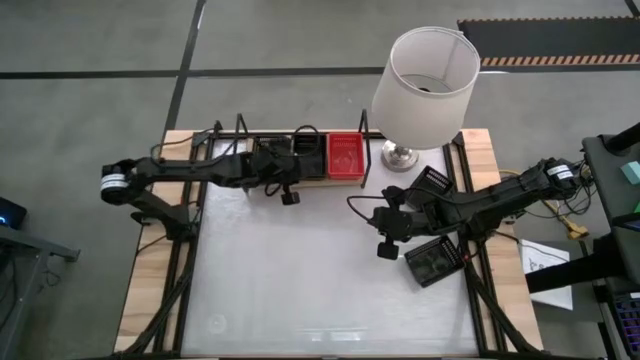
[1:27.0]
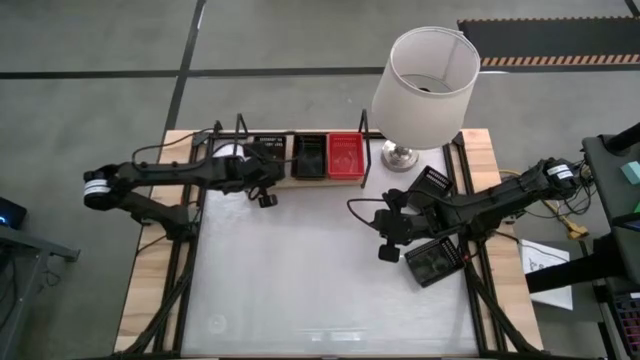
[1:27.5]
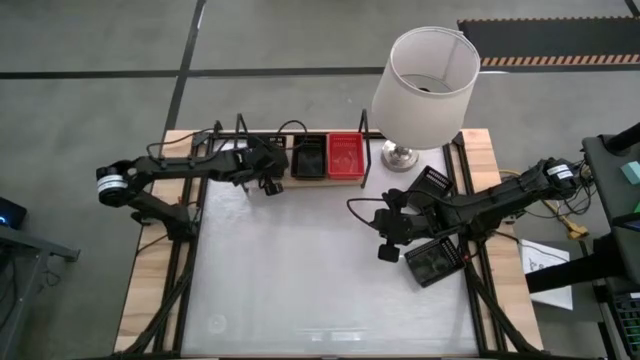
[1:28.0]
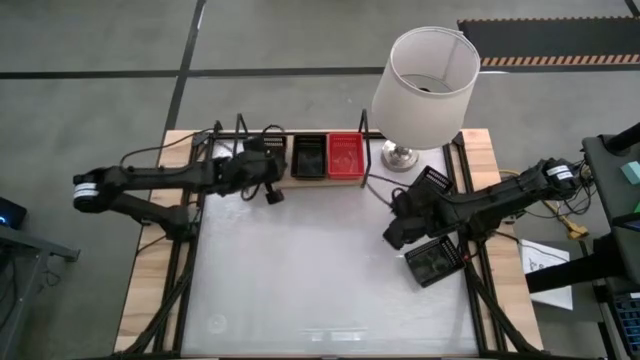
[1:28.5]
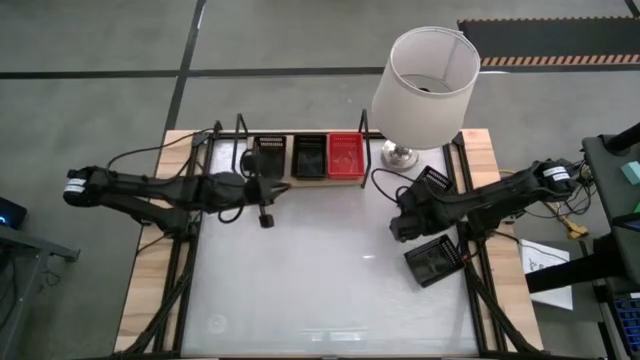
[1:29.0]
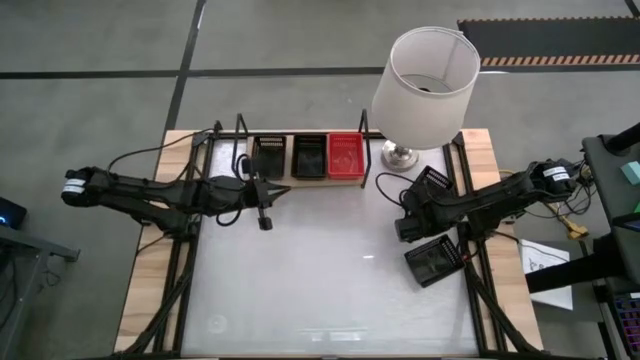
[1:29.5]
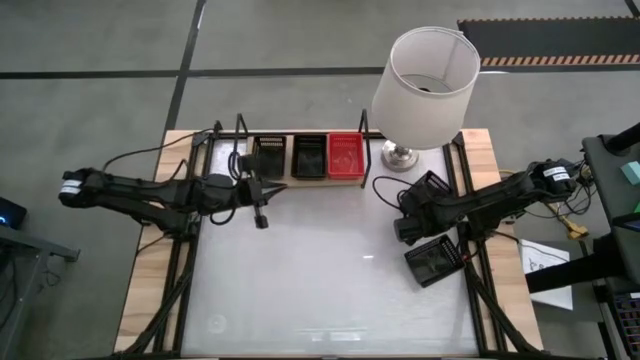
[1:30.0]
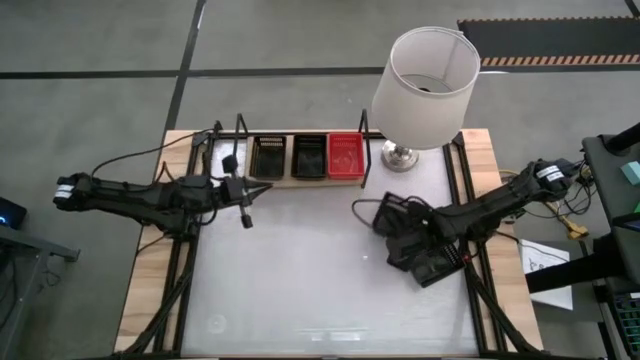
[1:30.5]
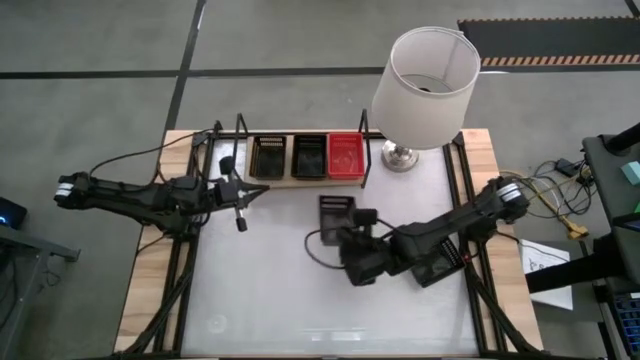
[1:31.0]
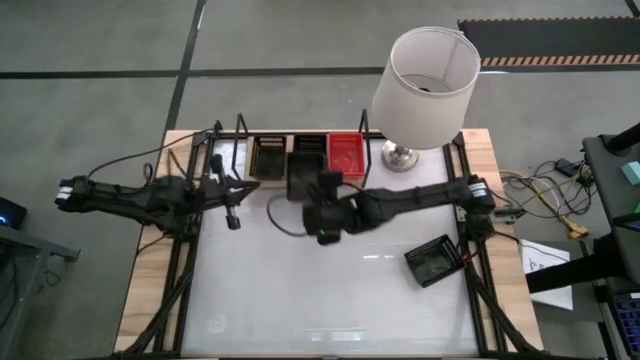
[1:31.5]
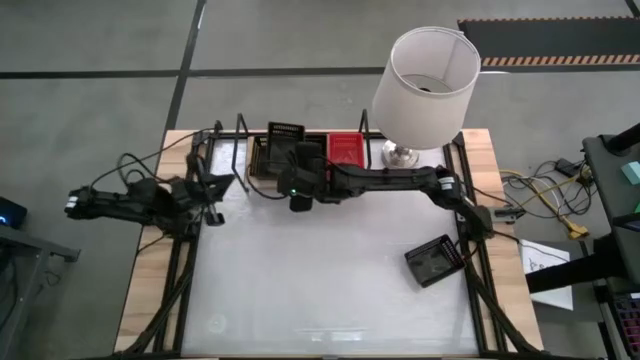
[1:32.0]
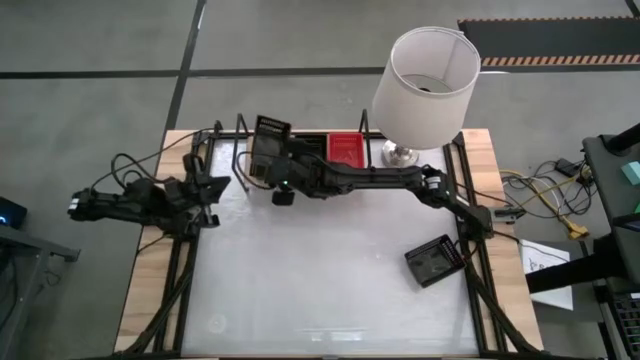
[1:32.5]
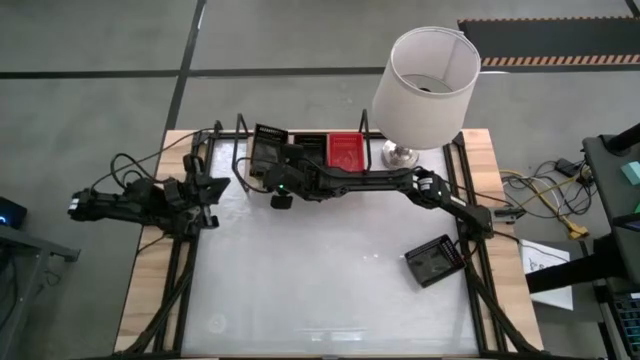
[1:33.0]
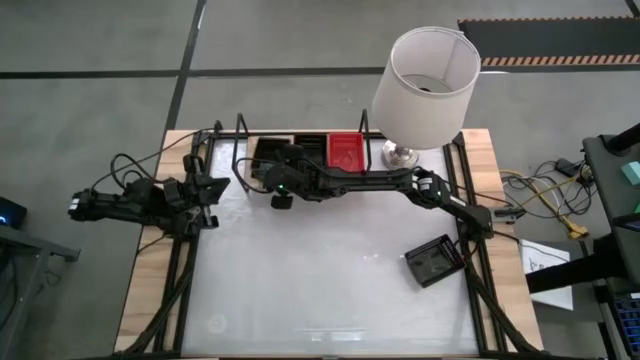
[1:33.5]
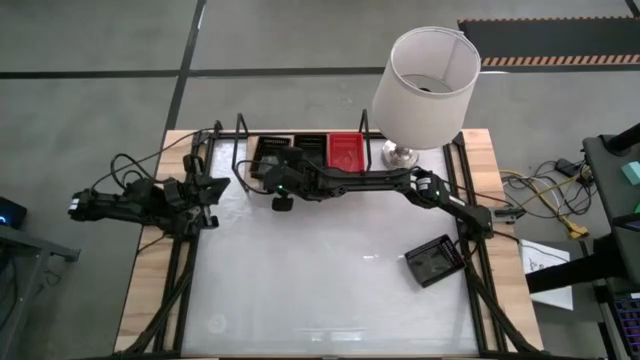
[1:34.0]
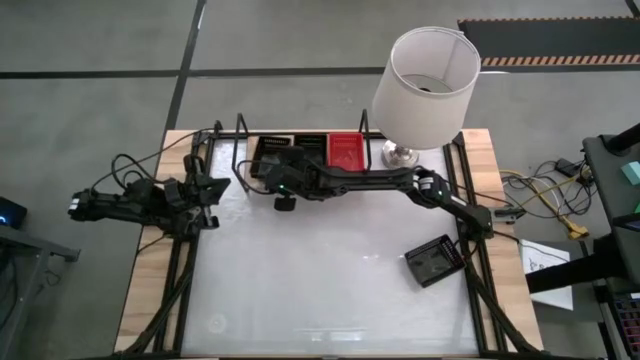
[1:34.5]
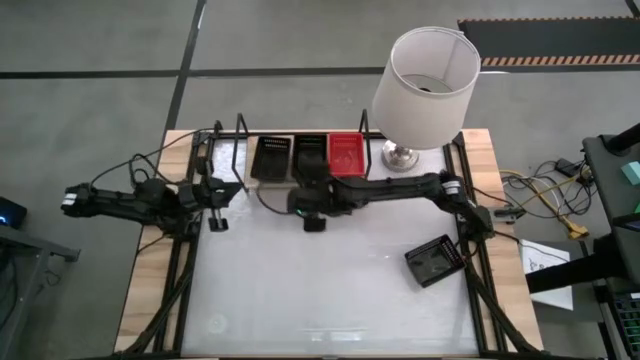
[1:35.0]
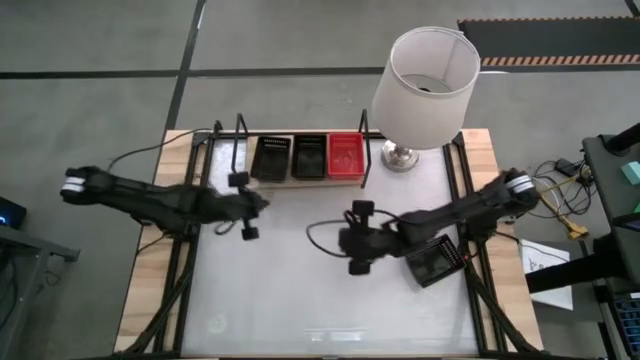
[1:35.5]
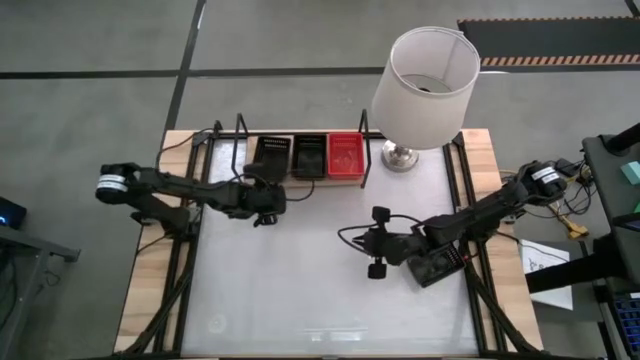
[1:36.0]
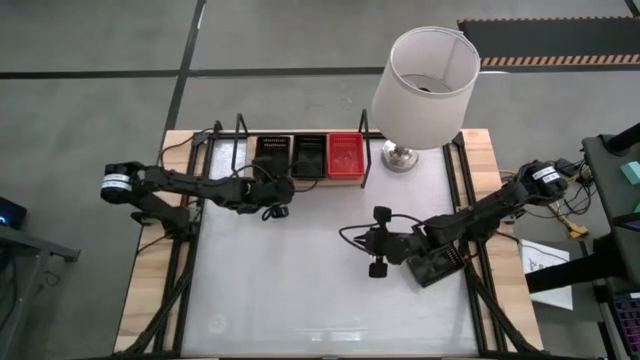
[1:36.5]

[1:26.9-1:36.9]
Task: Stack baskets on shelf by color
Stack the black bin on the left black bin on the shelf

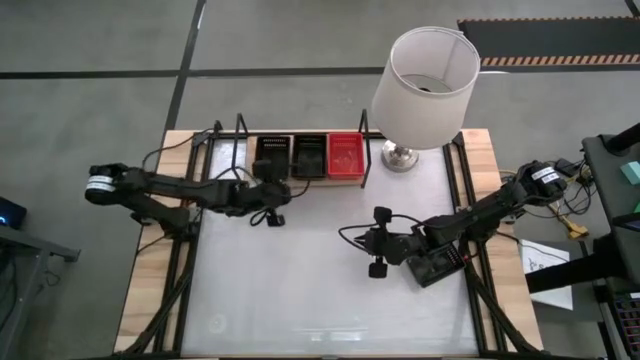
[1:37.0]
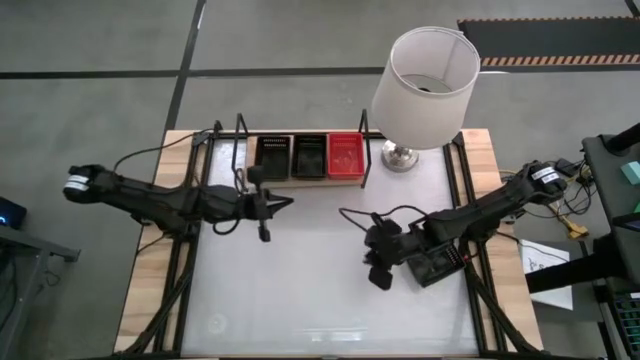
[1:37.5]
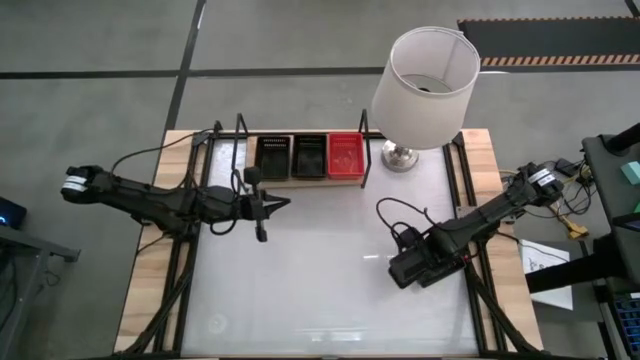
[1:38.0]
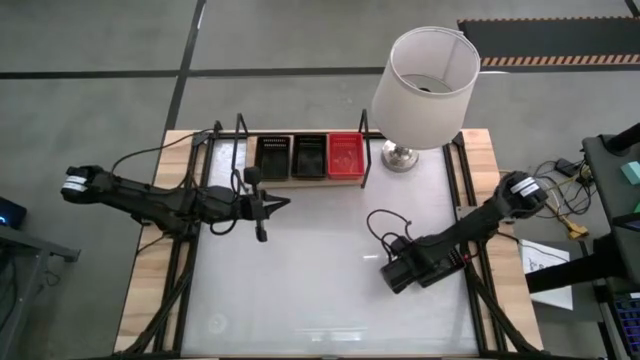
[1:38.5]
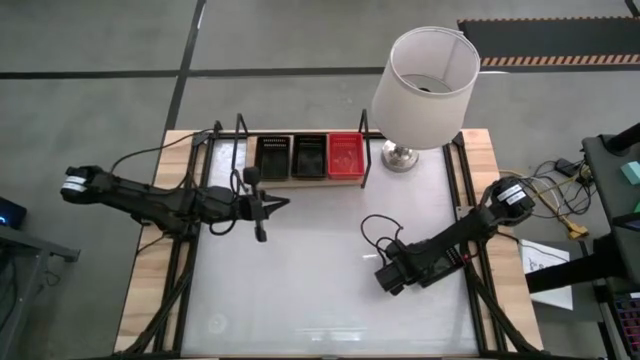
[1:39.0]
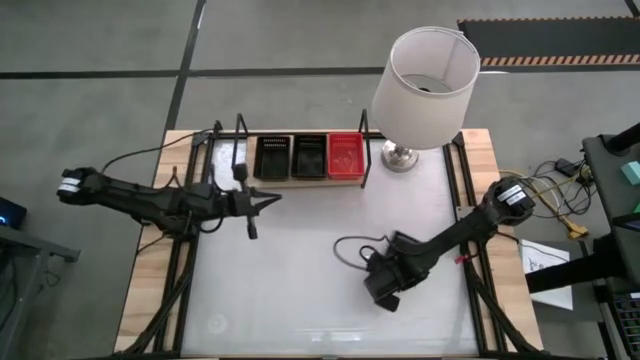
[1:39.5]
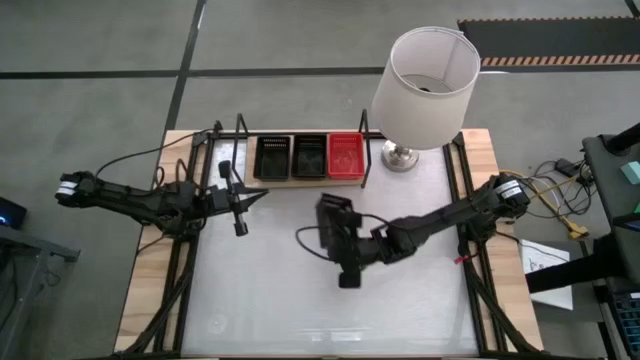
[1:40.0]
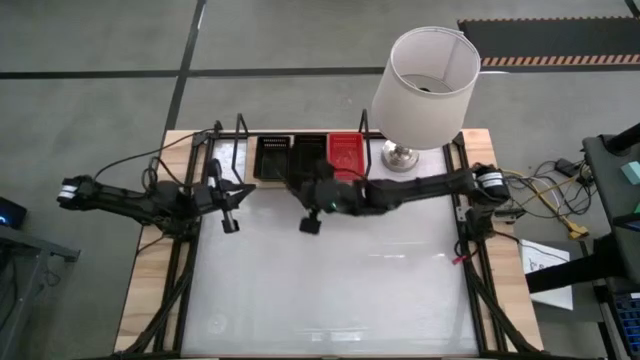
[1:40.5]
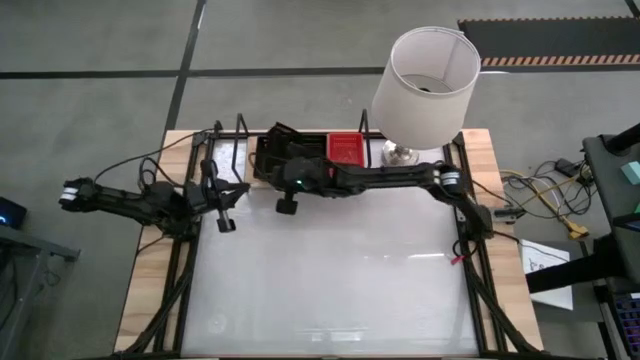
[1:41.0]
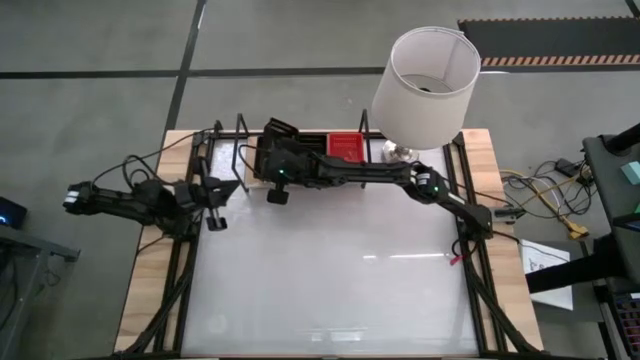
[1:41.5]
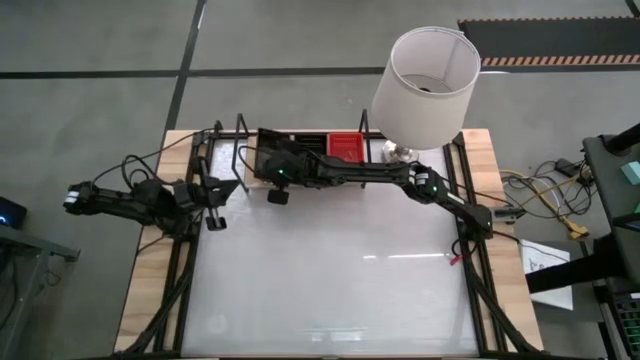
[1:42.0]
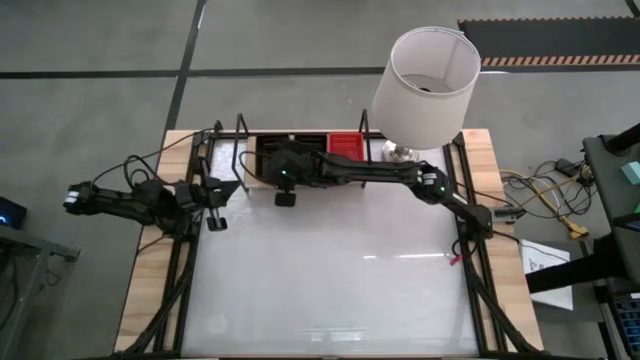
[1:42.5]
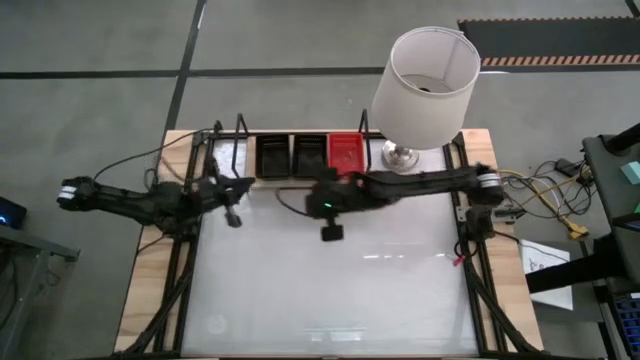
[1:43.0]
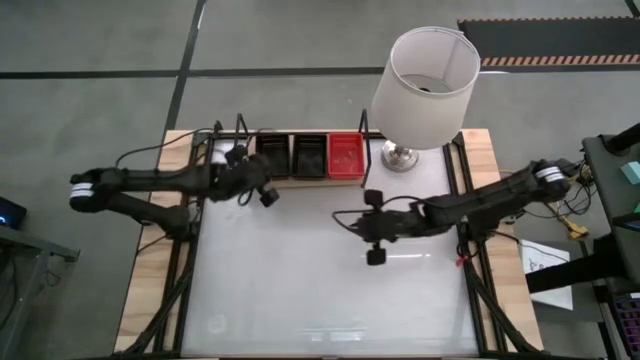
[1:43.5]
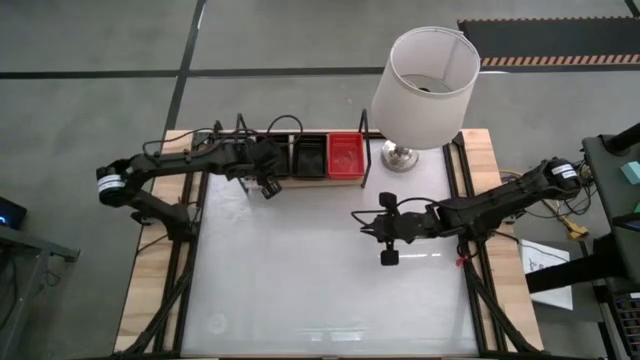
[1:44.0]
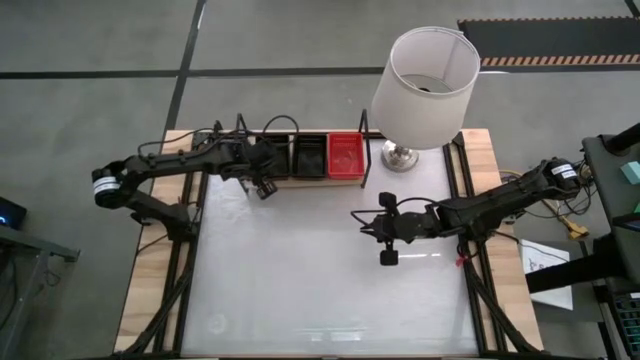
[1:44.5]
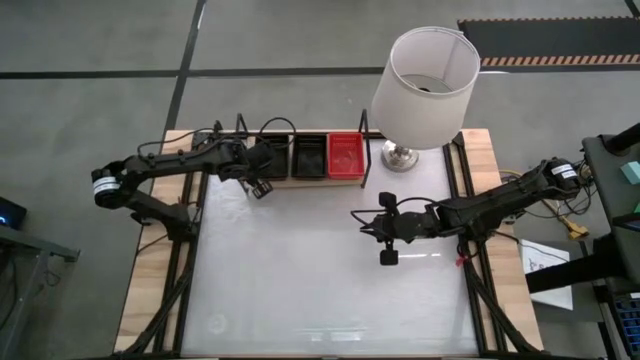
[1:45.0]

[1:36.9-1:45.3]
Stack the black bin on the left black bin on the shelf

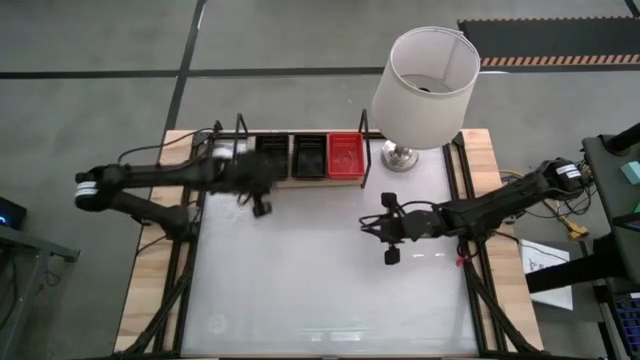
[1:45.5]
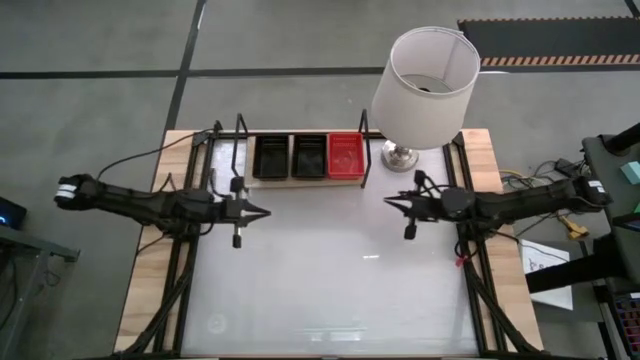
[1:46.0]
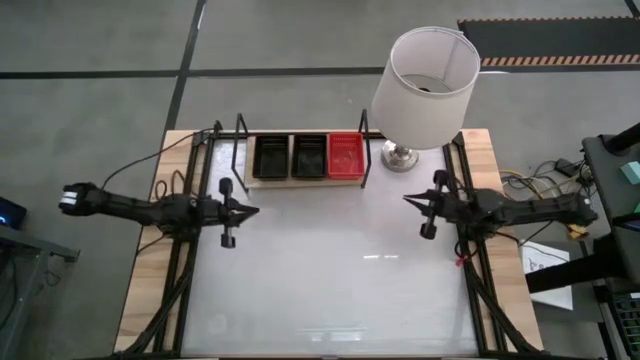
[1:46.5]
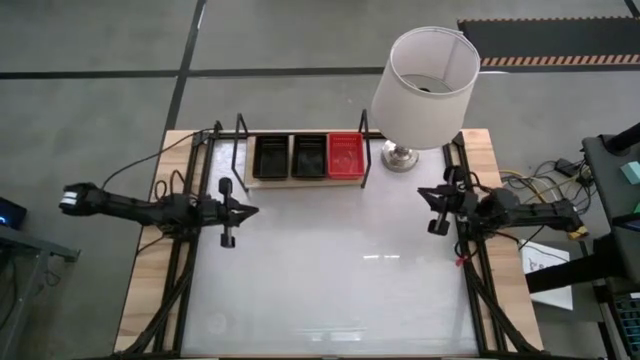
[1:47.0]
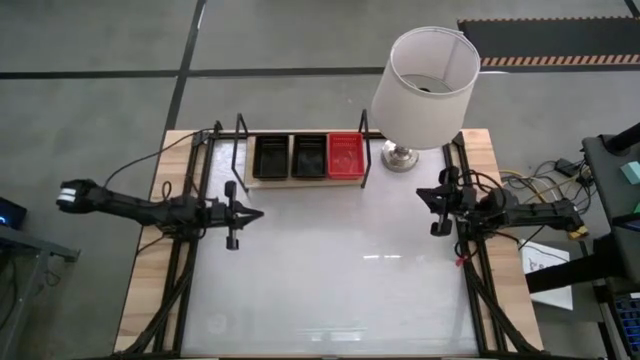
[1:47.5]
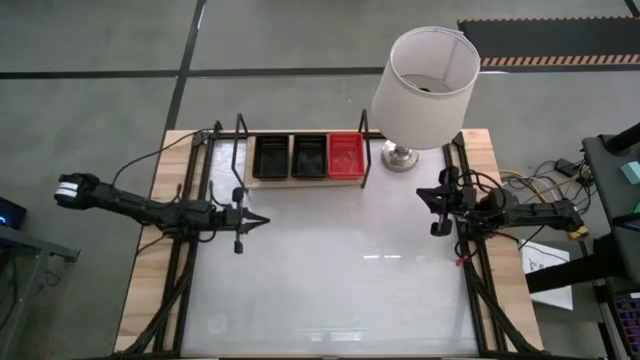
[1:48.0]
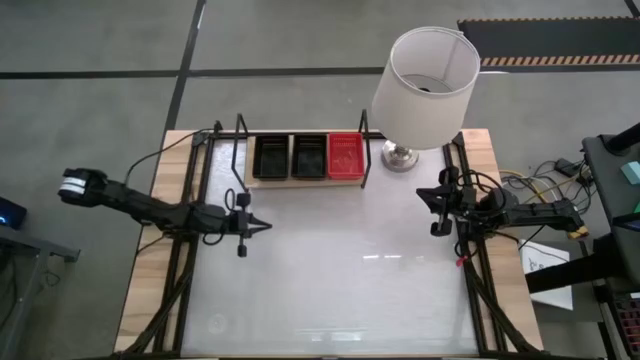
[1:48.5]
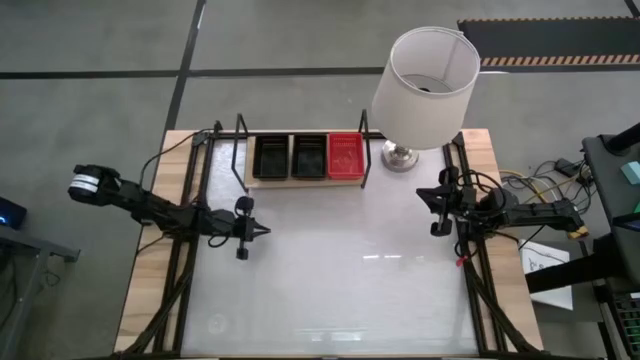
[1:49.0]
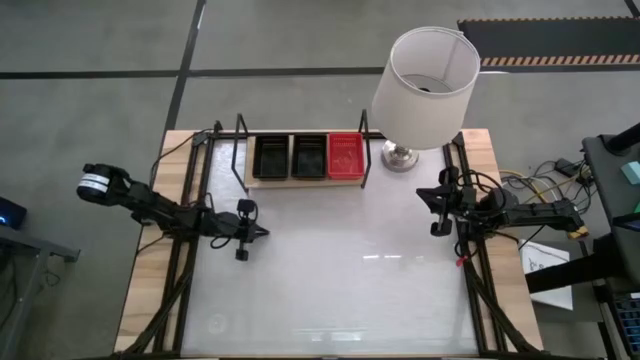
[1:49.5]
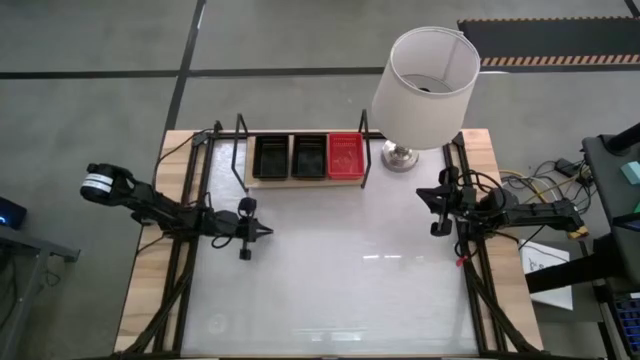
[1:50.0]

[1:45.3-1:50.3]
Return to Home Position
